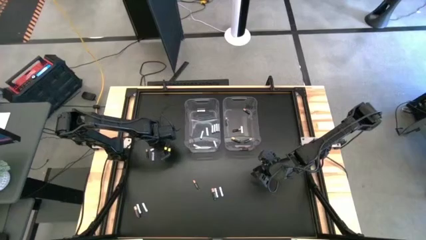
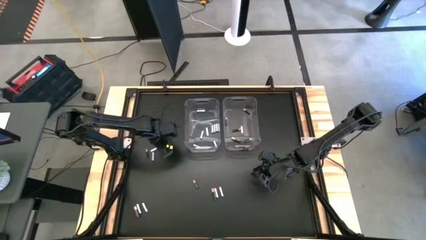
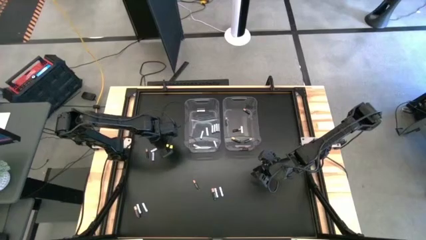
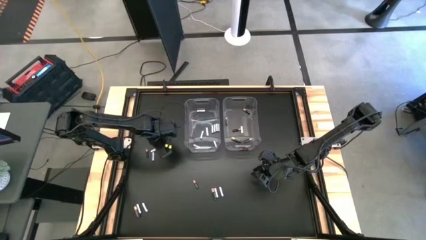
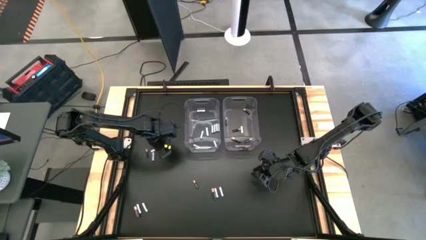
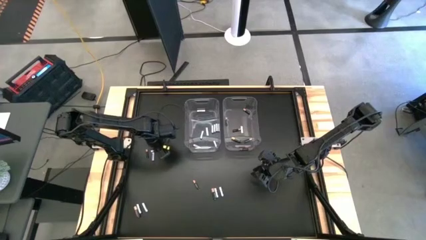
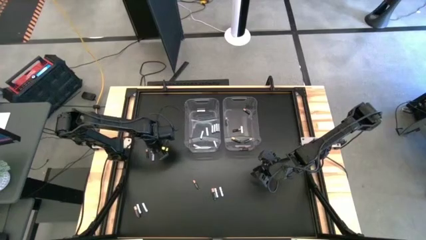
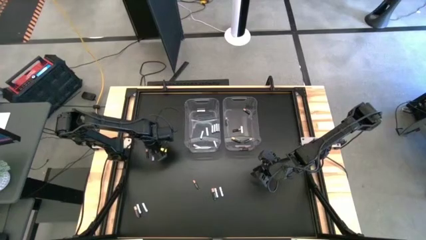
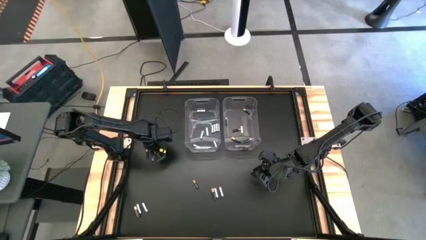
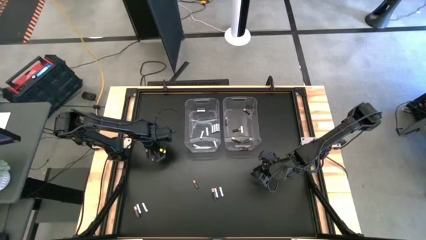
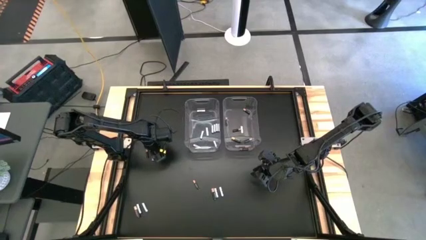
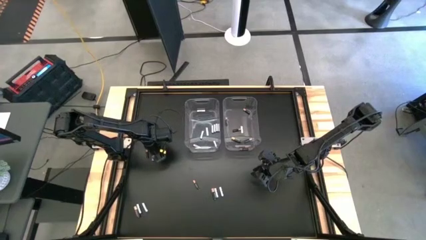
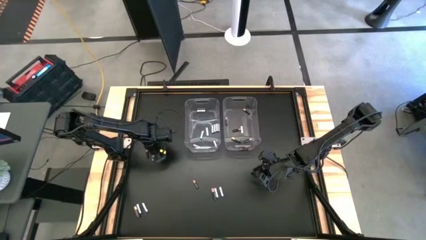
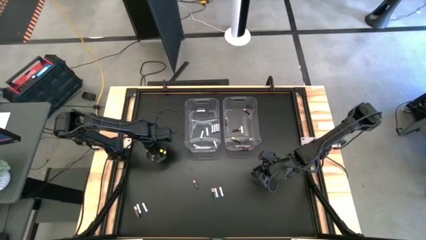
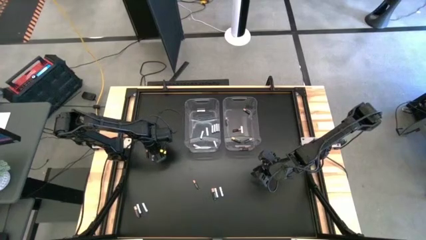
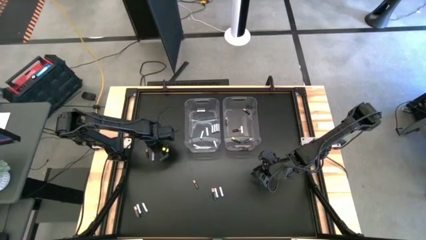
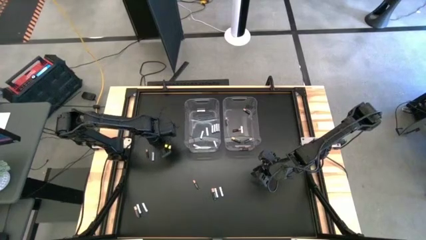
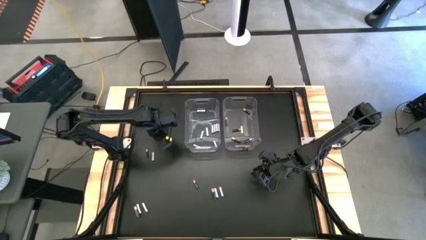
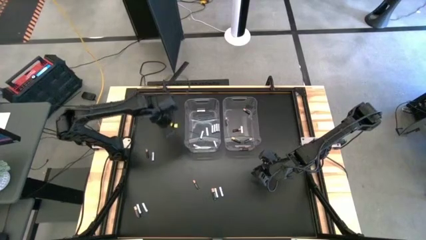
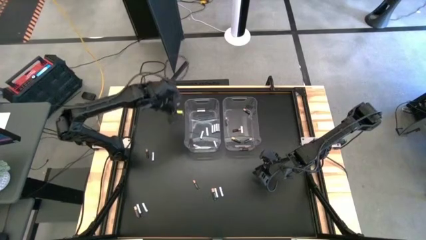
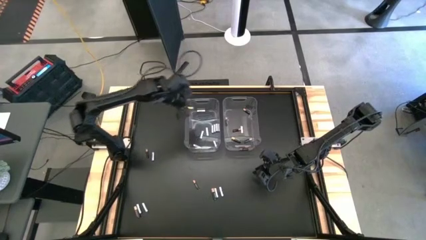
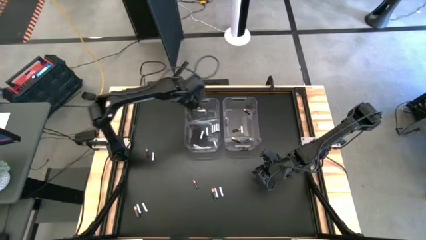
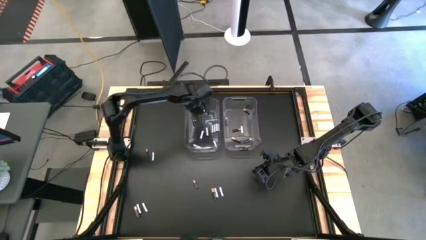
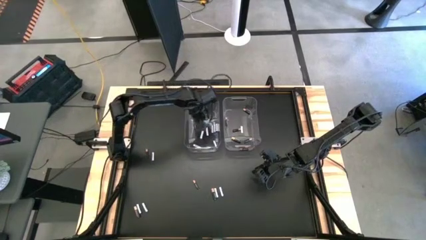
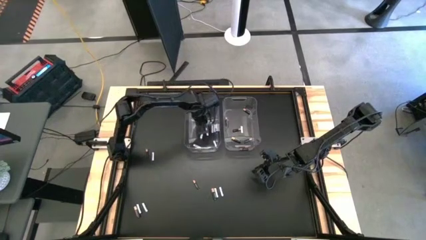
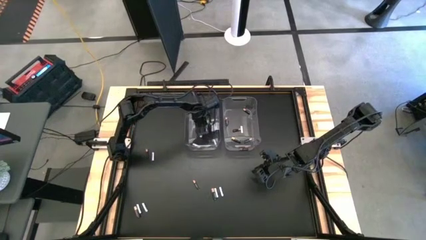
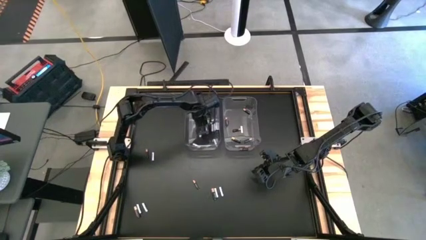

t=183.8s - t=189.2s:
Task: Sort batteries
Put the white battery into the left transparent bin

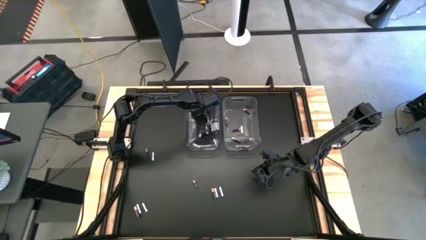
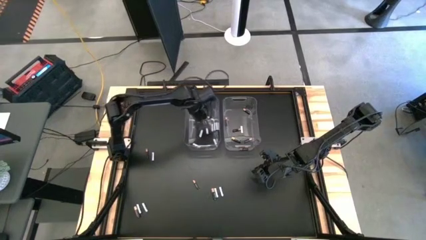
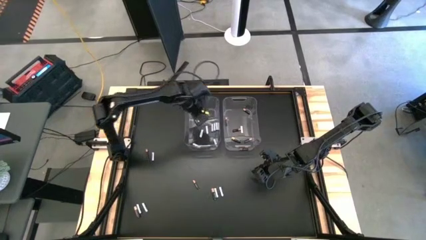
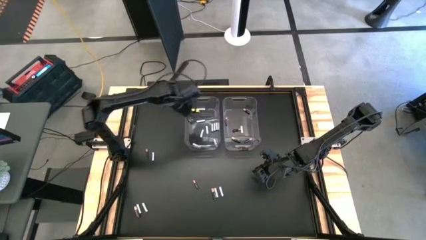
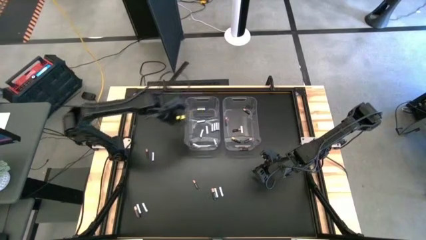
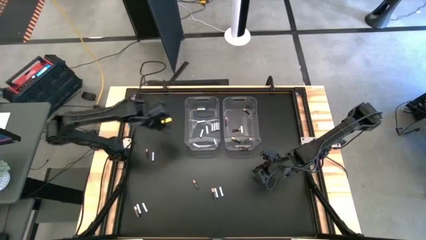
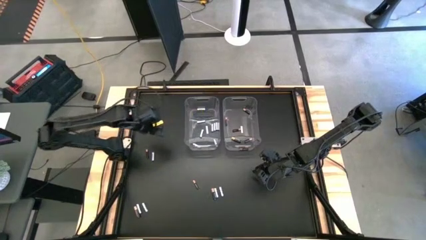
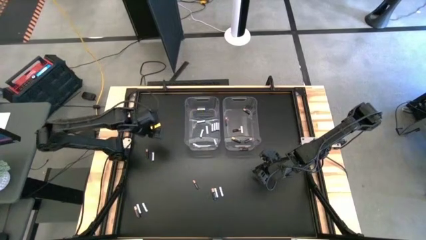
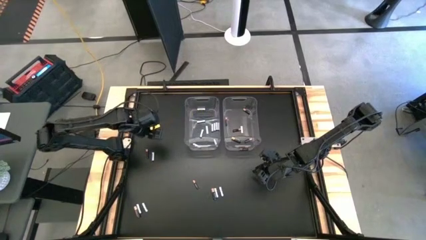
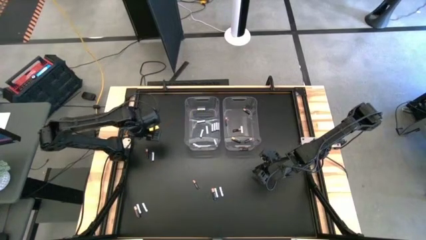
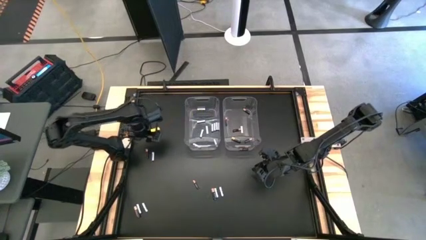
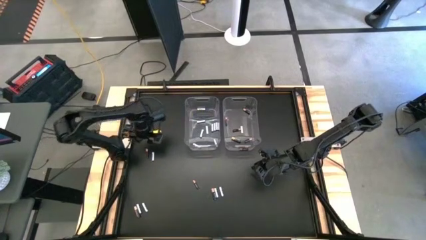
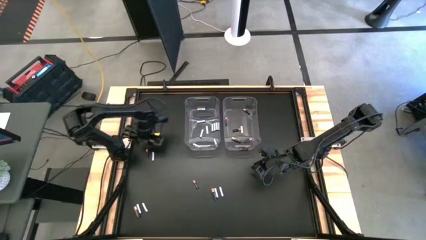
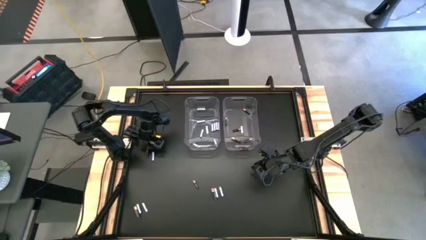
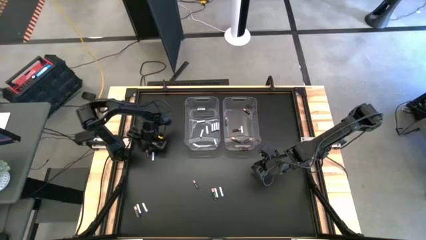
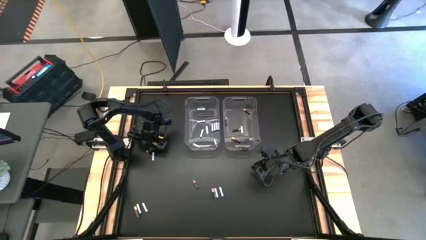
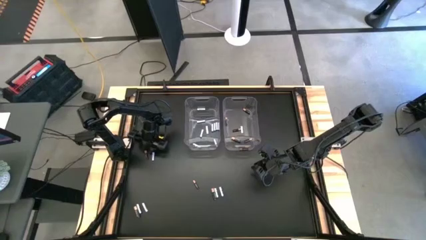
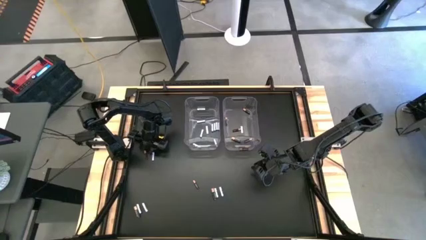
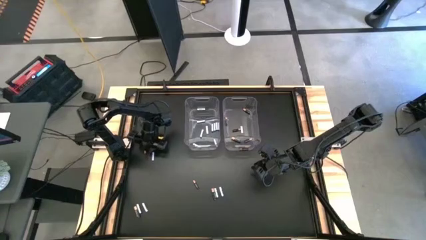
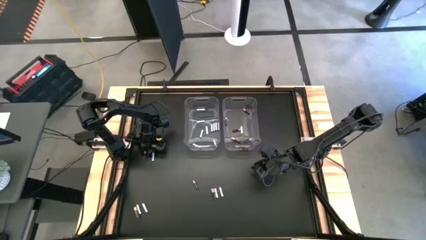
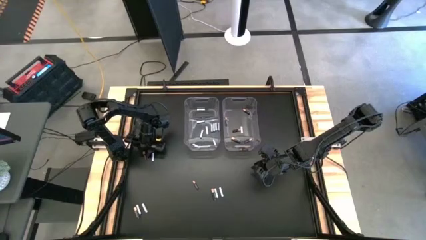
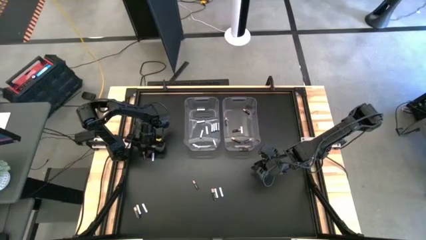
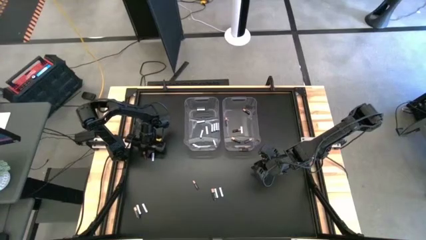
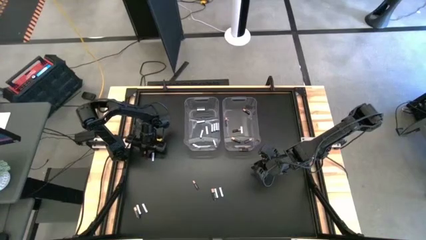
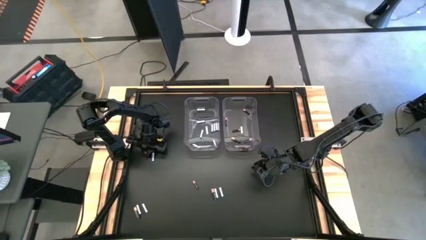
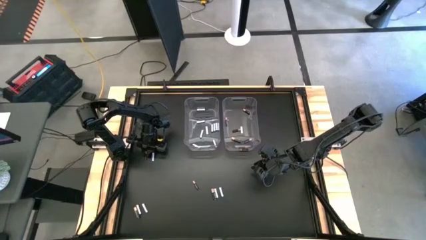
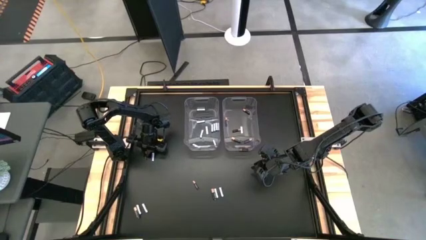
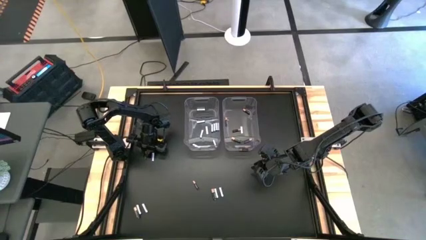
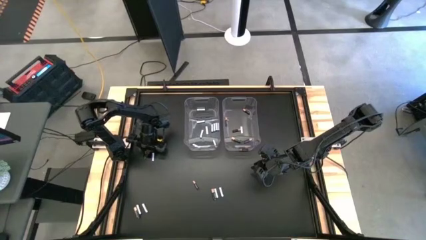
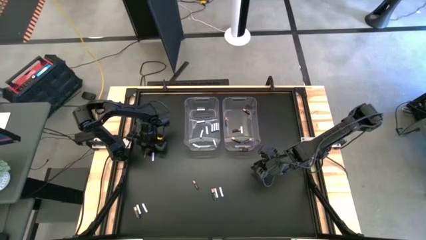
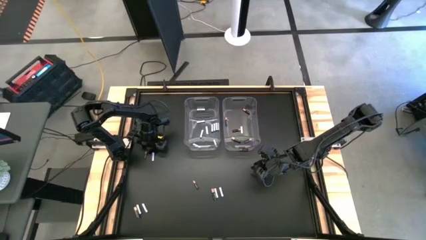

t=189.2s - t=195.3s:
Put the black battery into the right transparent bin

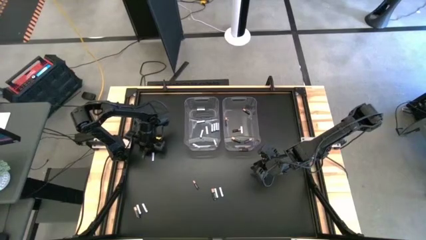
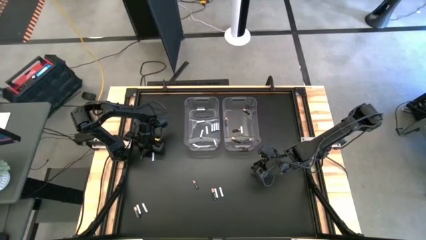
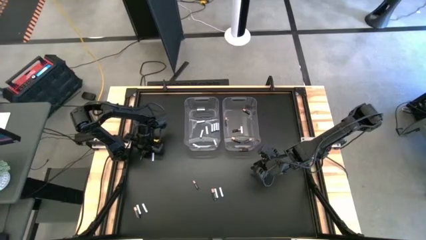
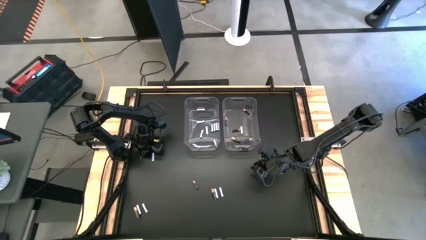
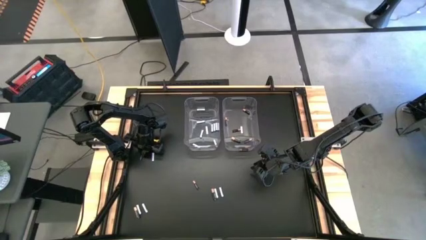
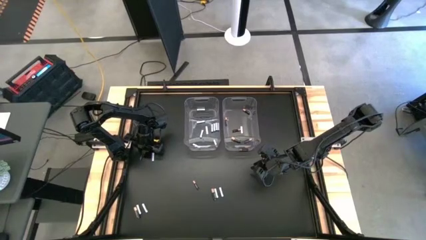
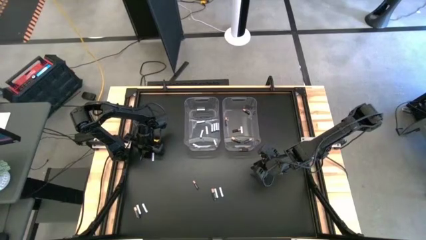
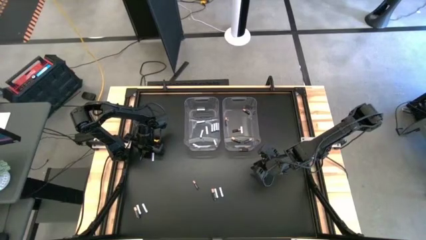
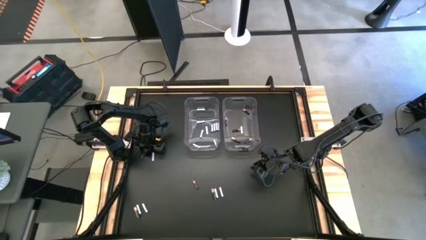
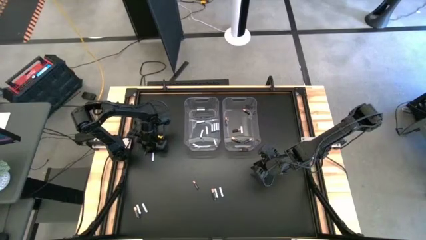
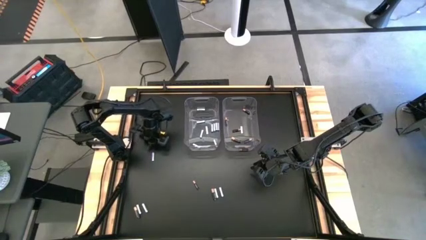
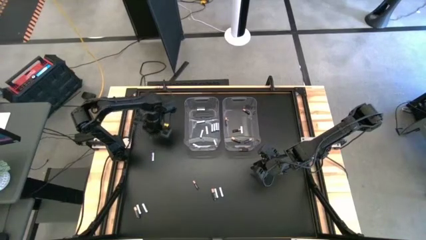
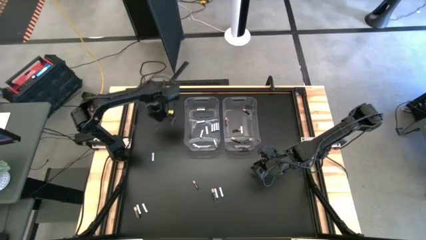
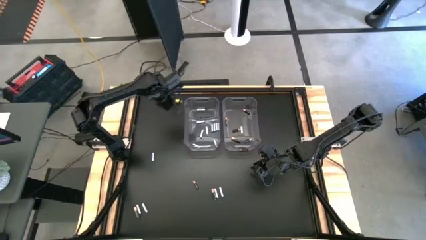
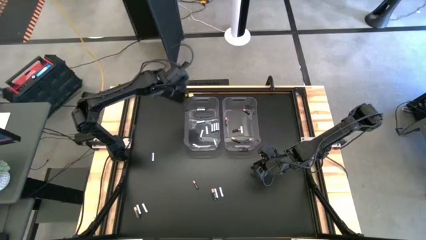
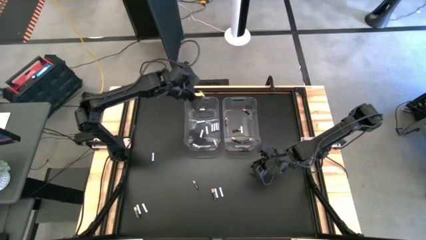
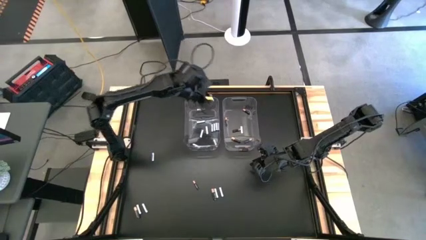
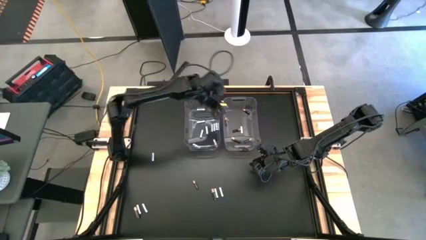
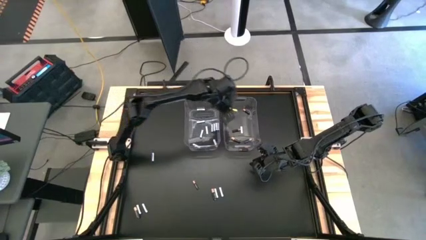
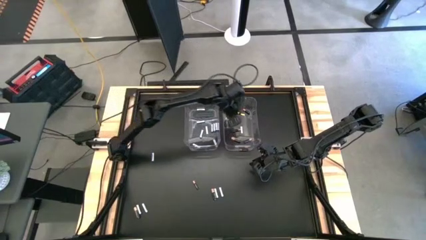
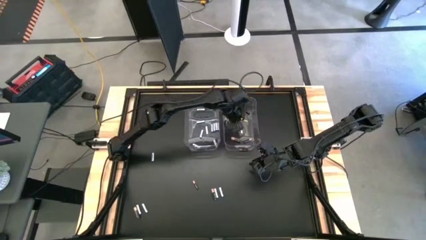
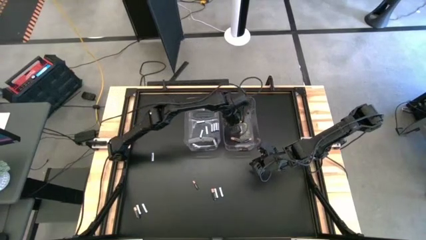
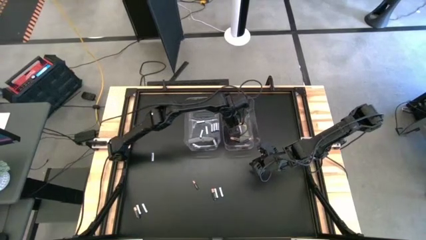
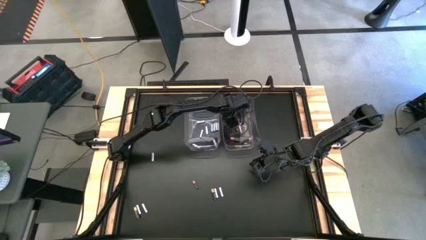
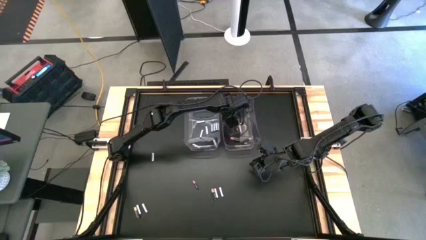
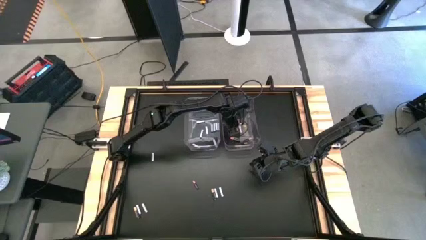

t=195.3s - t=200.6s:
Put the black battery into the right transparent bin

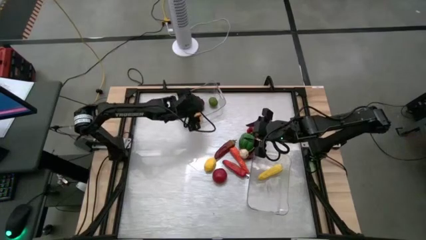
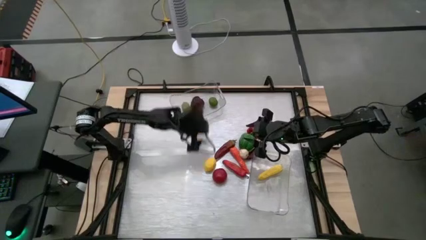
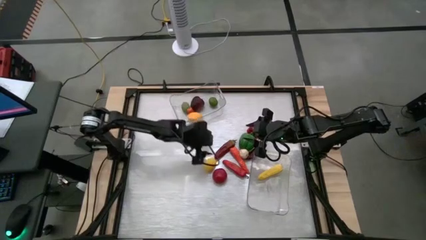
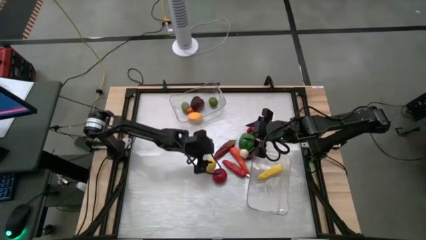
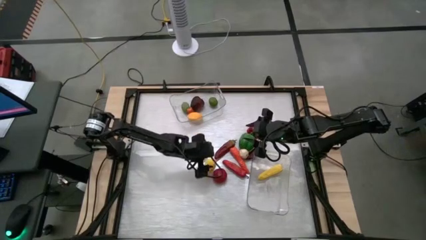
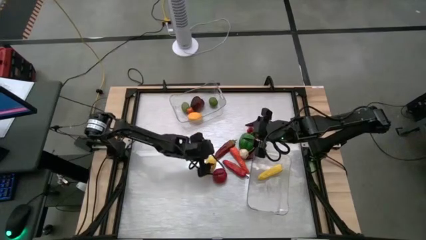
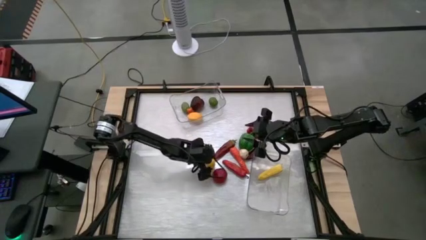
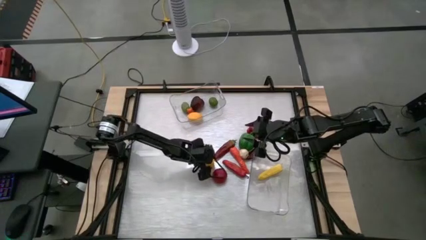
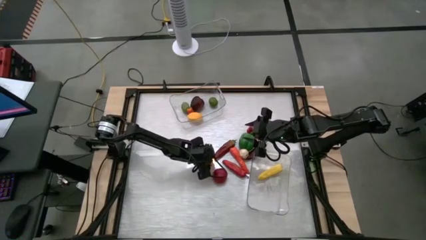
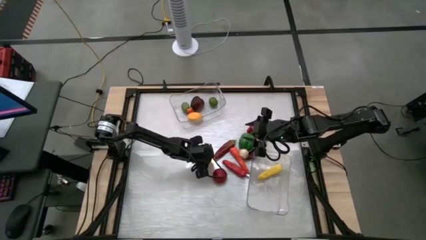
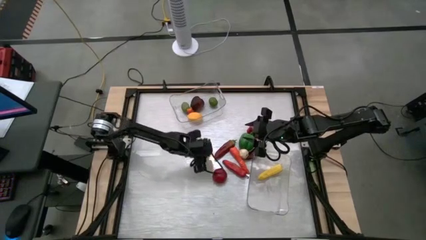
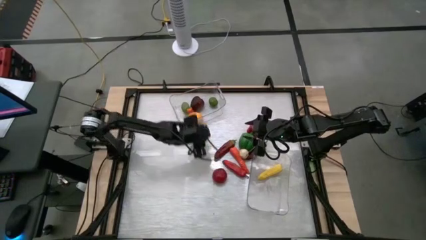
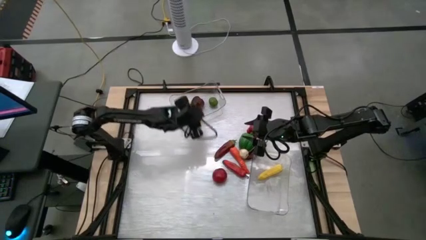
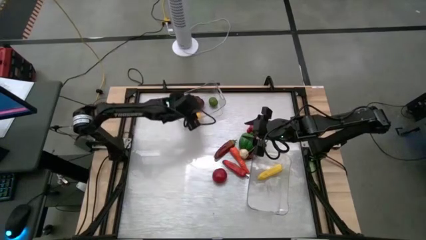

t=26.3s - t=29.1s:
Task: Sort produce into baskets
Put the yellow lemon into the top transparent bin
